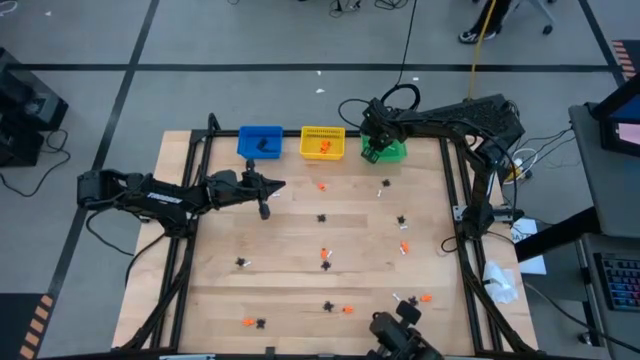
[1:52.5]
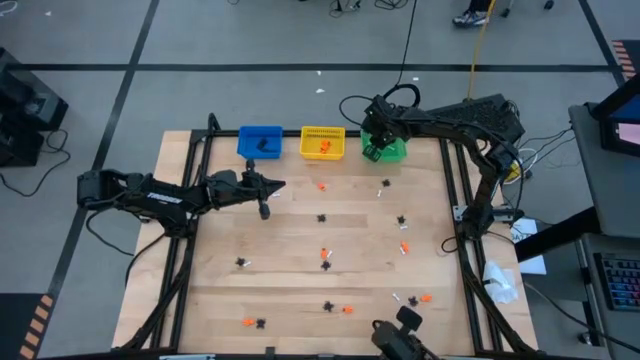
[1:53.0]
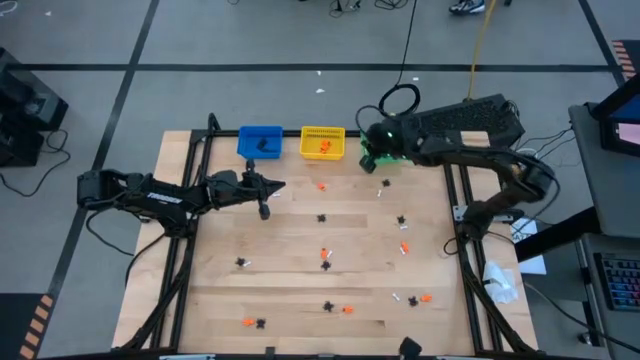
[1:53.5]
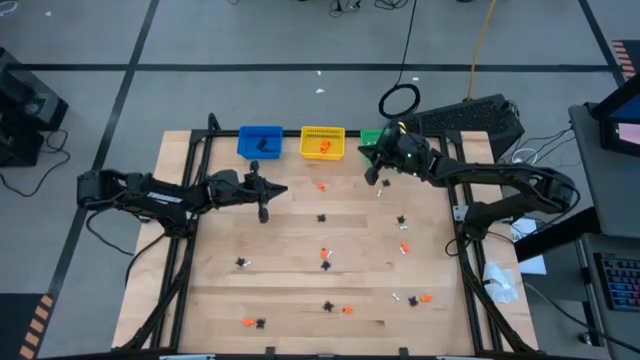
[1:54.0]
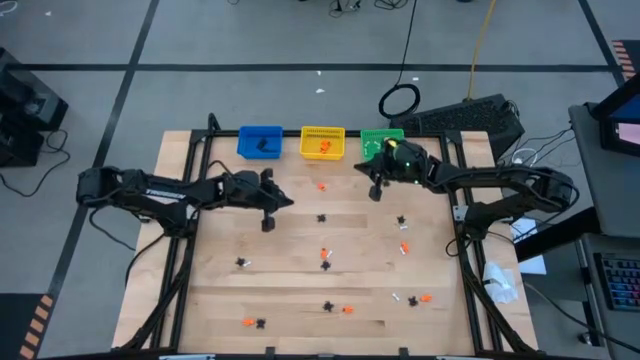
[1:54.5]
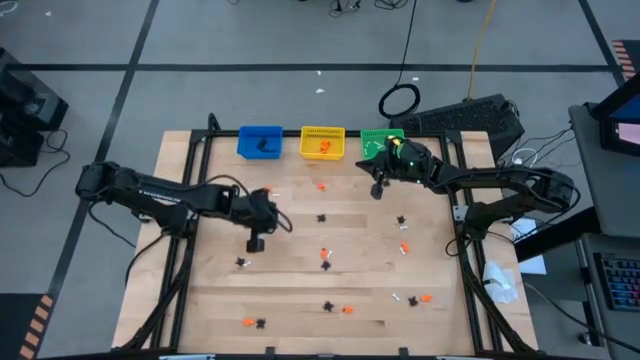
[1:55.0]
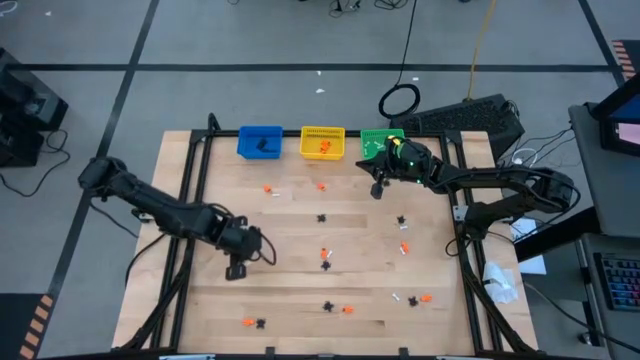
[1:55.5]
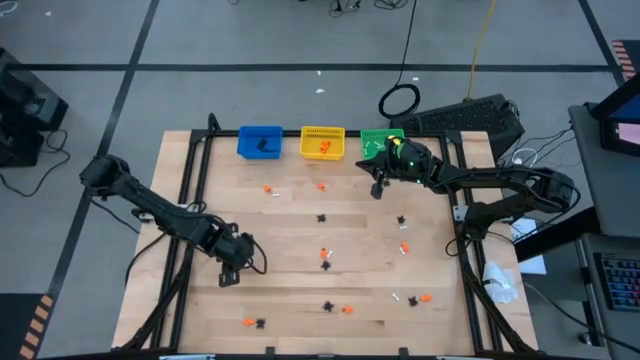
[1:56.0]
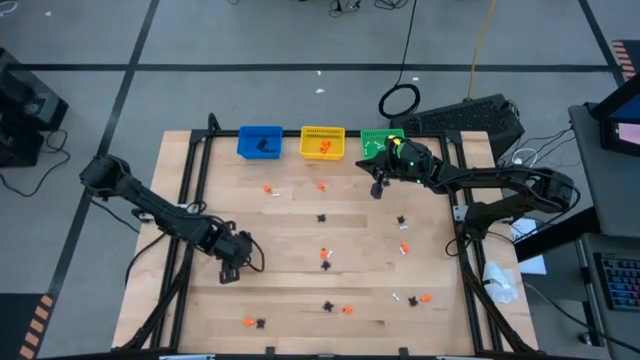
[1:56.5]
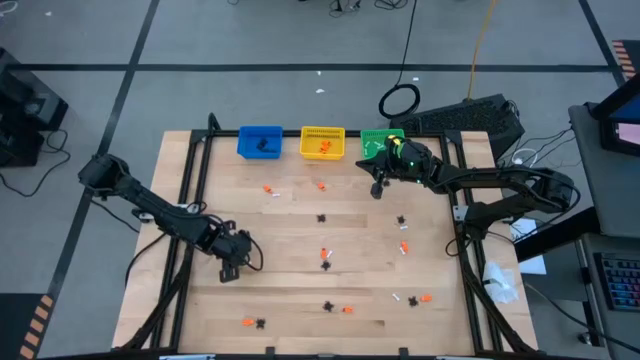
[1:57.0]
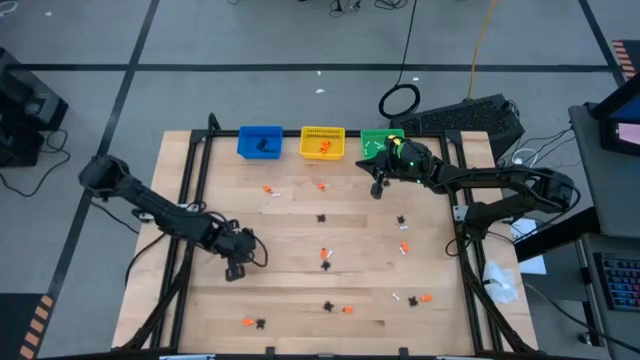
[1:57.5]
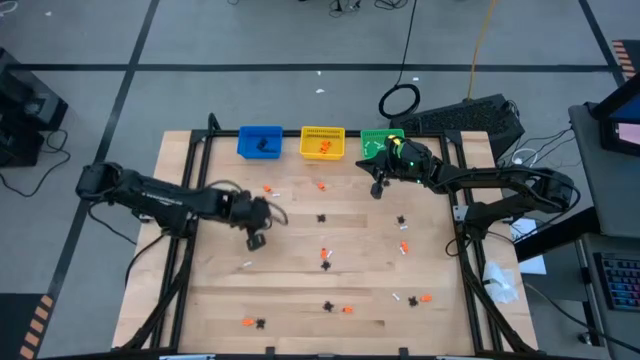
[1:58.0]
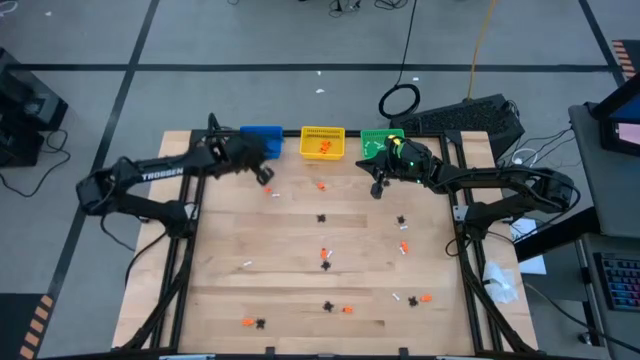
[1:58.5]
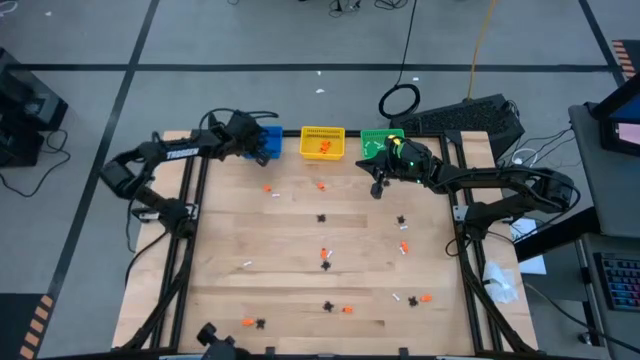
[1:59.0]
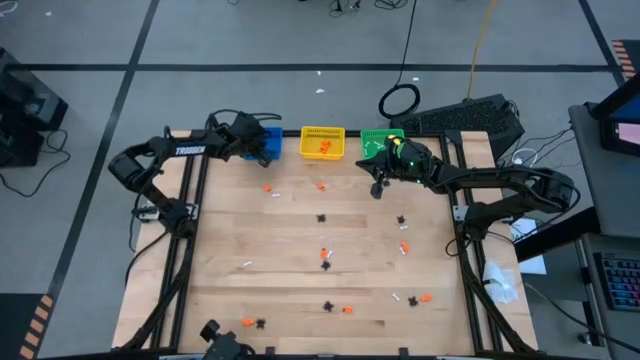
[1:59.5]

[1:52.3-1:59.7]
Task: Sort Halloween decoration
Put the black spider toy into the blue bin

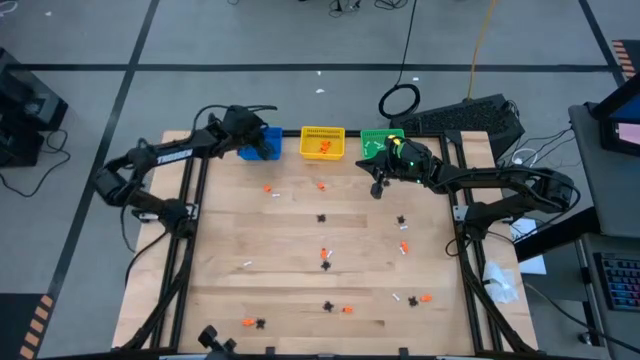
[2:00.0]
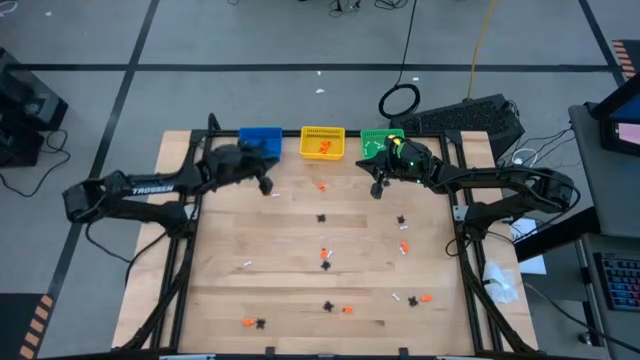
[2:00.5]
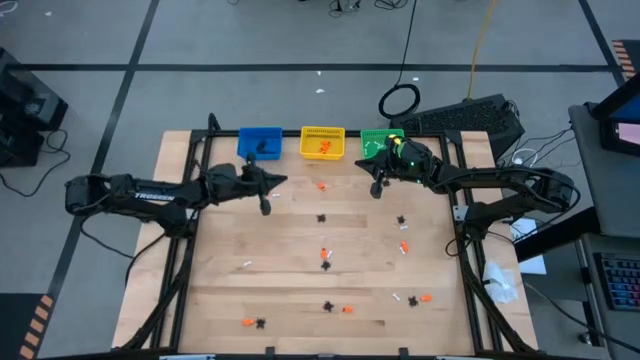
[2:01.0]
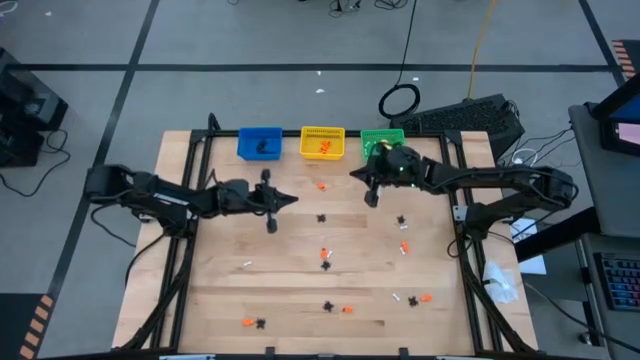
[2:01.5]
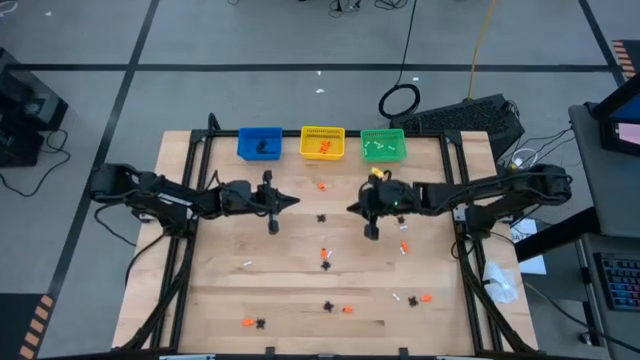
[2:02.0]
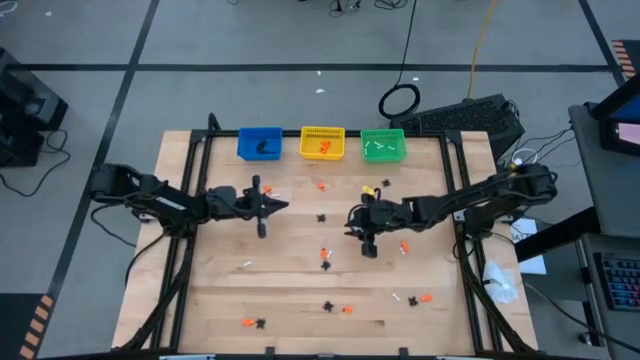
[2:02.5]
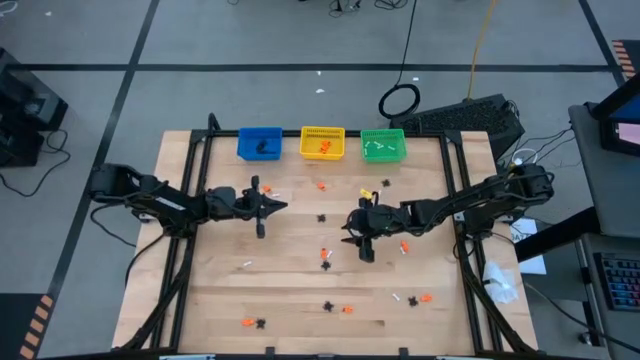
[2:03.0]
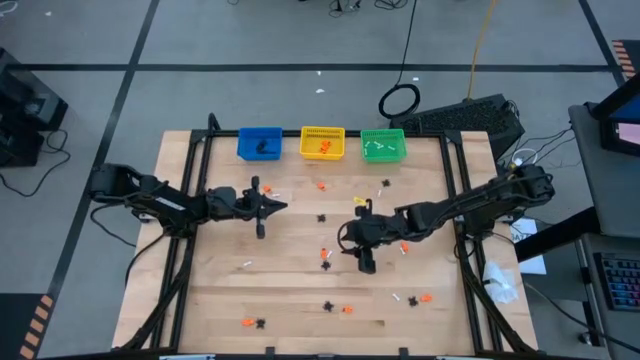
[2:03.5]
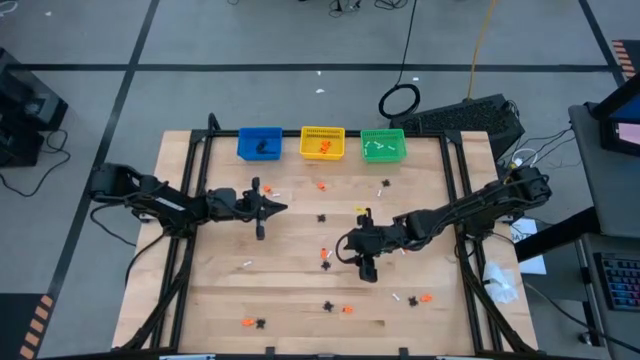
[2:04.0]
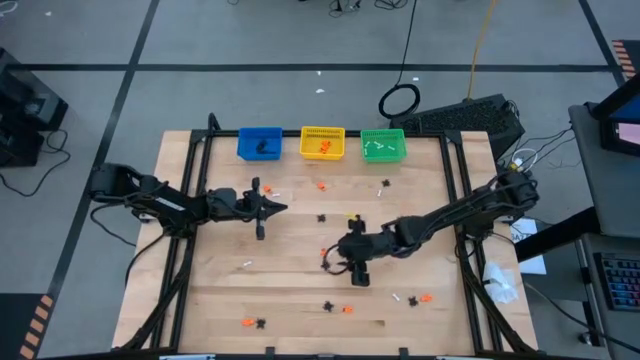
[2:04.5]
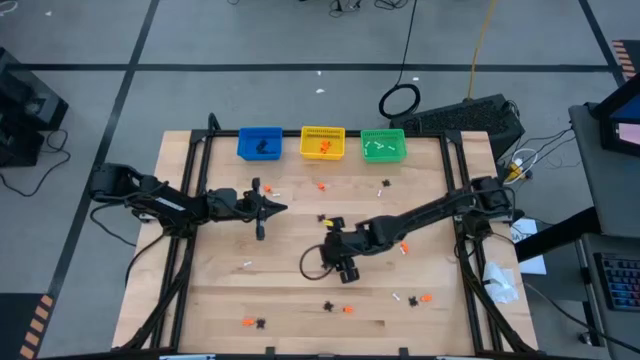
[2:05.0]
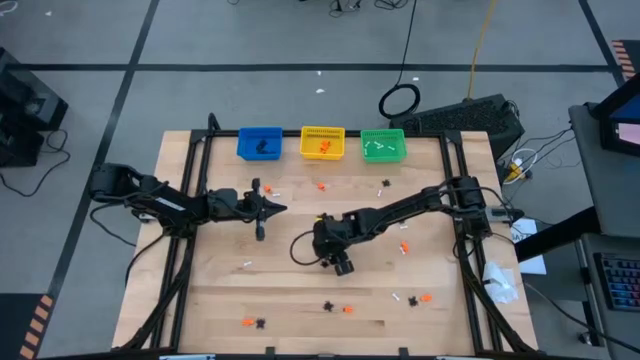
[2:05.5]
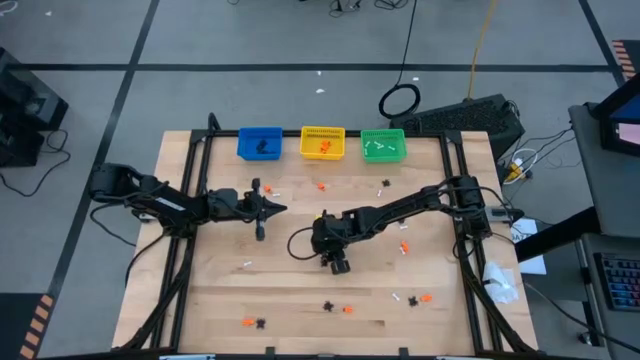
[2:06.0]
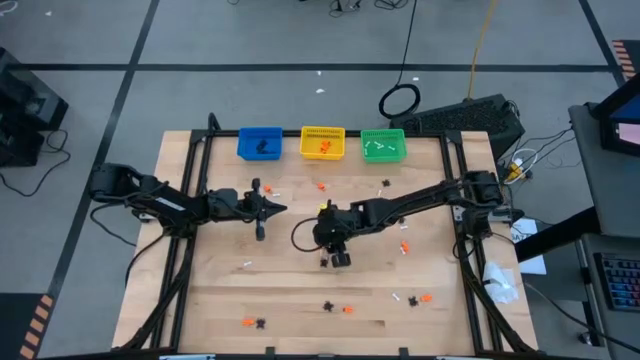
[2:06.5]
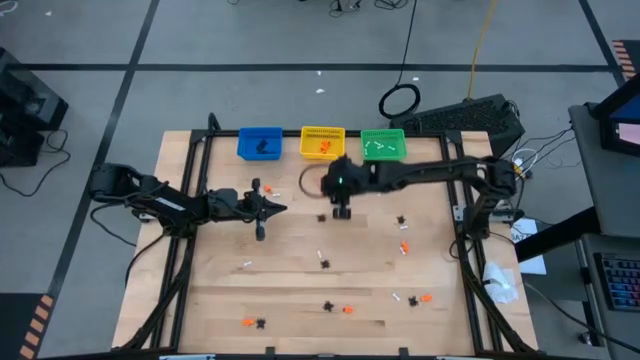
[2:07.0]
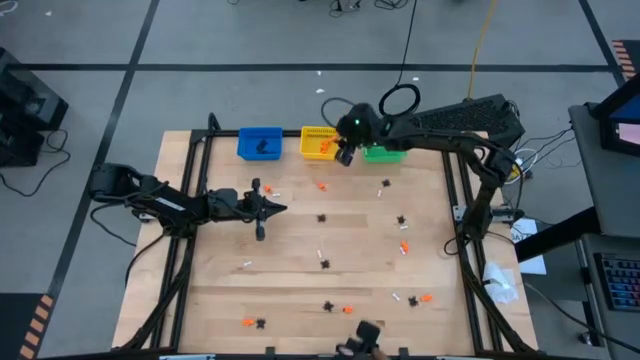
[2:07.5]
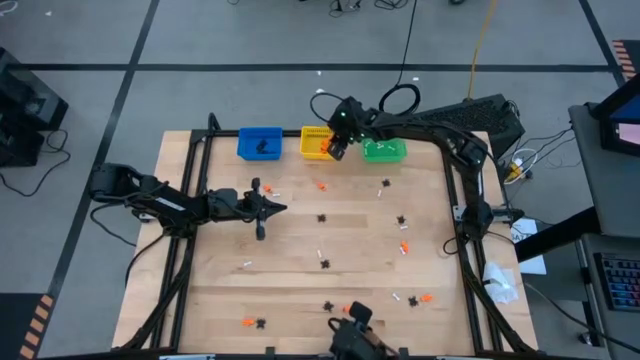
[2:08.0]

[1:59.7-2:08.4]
Put the orange skeleton toy into the yellow bin

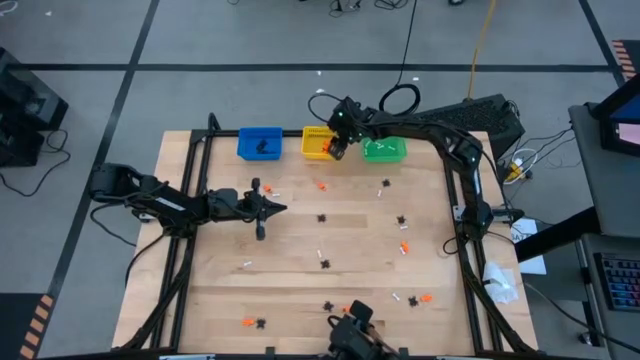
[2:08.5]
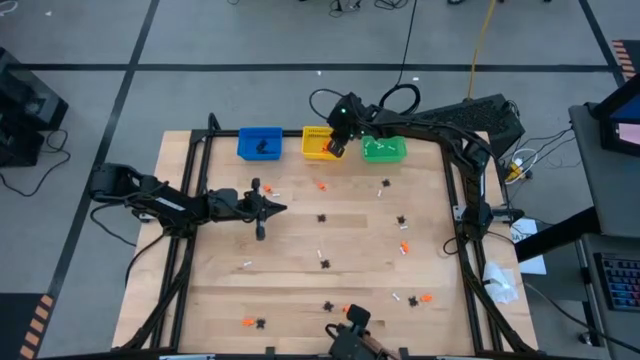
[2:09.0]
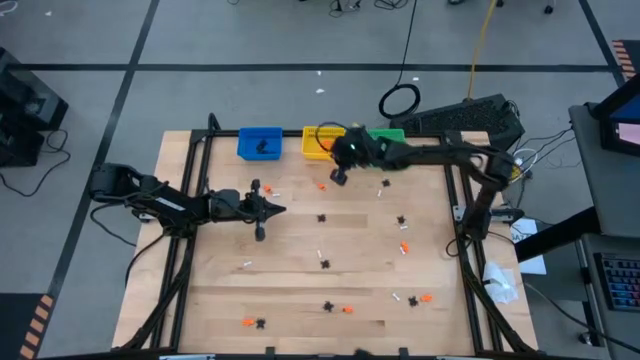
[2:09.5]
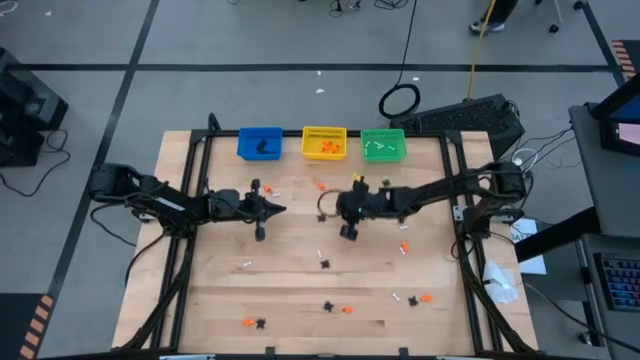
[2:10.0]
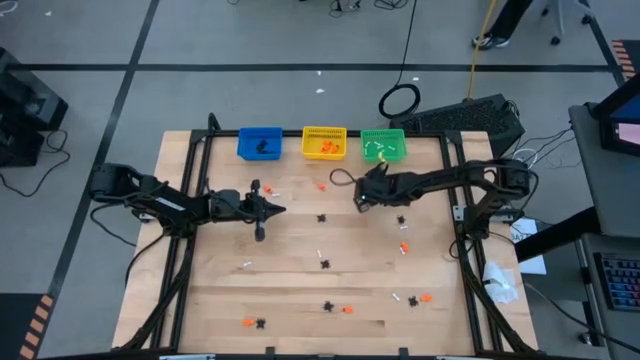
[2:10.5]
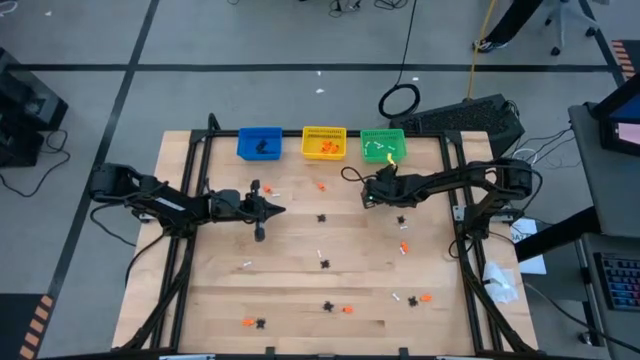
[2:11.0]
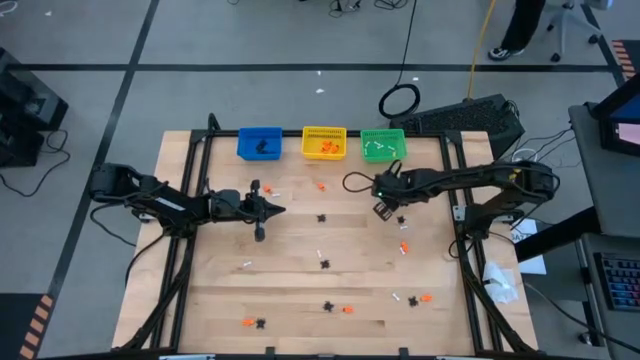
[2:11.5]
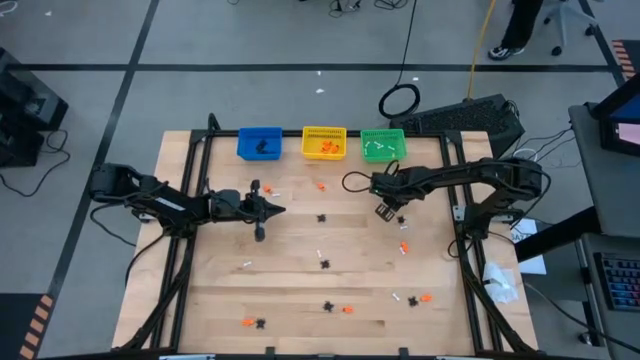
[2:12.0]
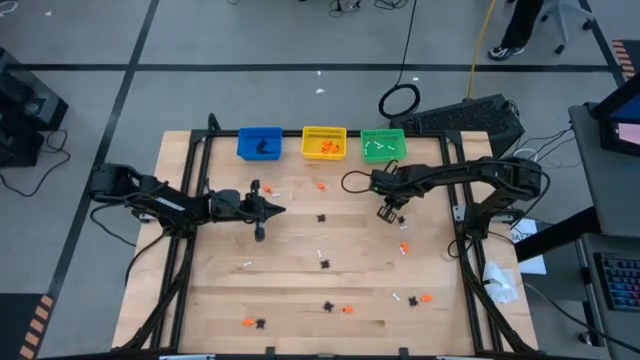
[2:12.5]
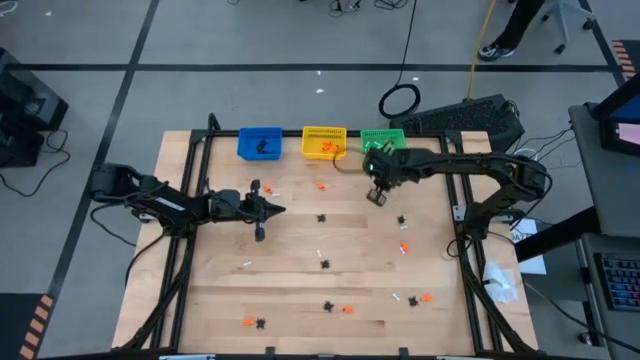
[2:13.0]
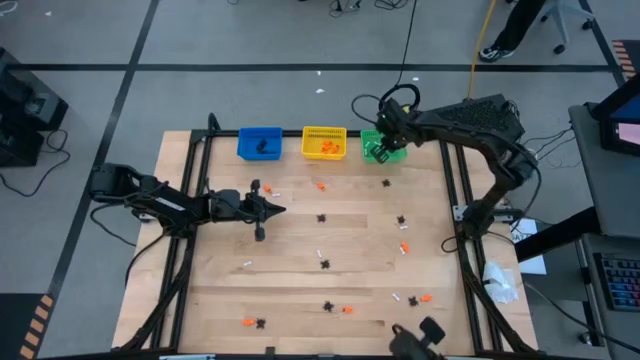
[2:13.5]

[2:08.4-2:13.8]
Put the white bone toy into the green bin
